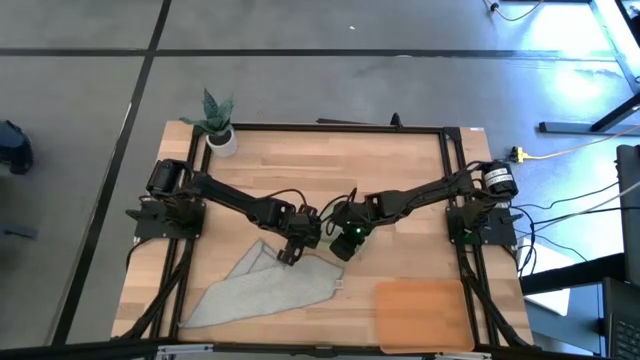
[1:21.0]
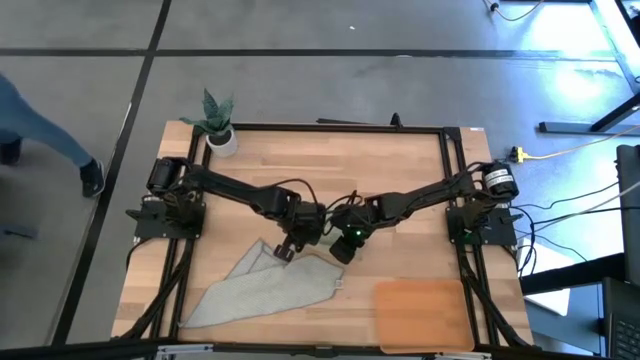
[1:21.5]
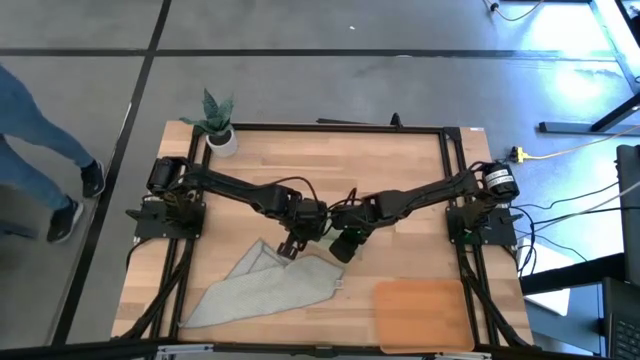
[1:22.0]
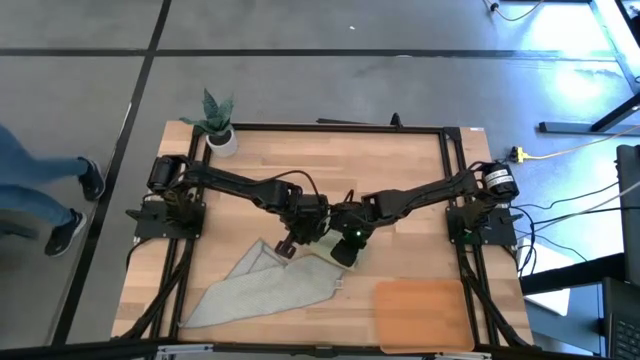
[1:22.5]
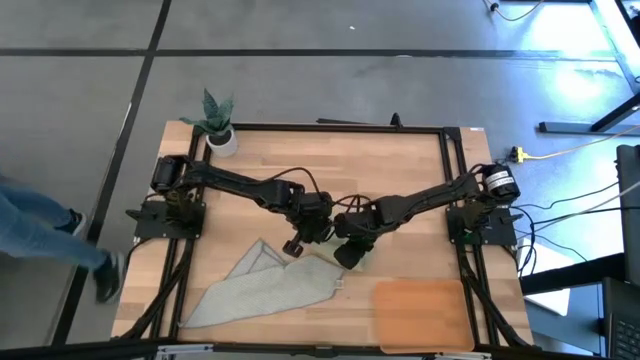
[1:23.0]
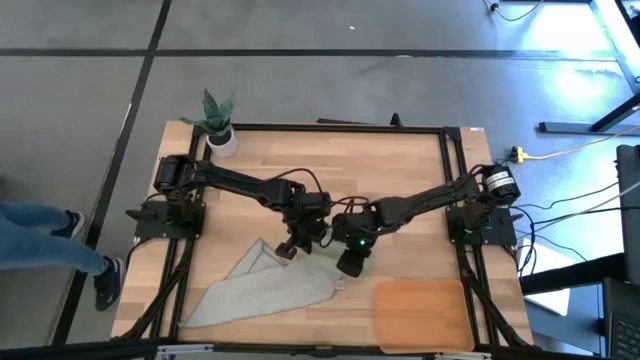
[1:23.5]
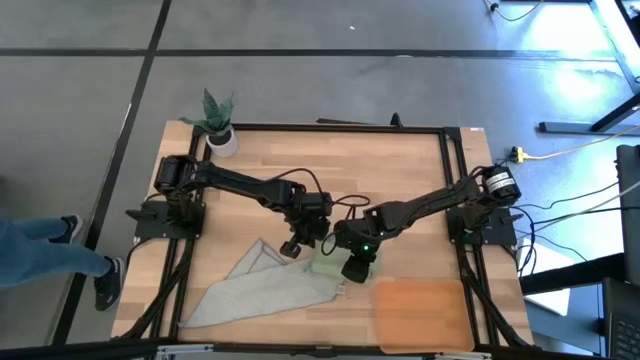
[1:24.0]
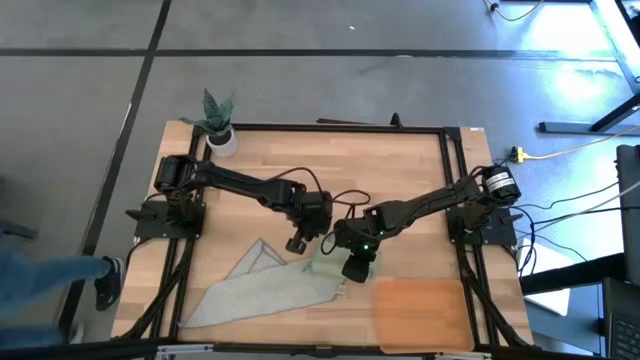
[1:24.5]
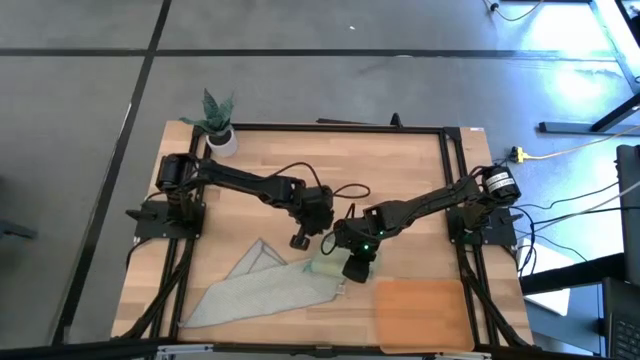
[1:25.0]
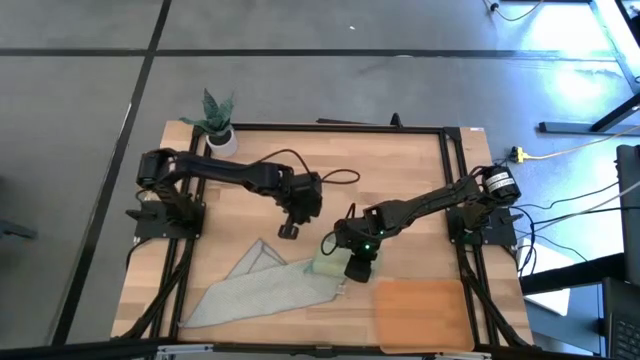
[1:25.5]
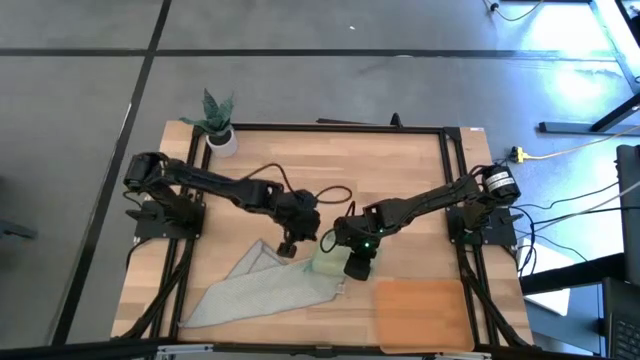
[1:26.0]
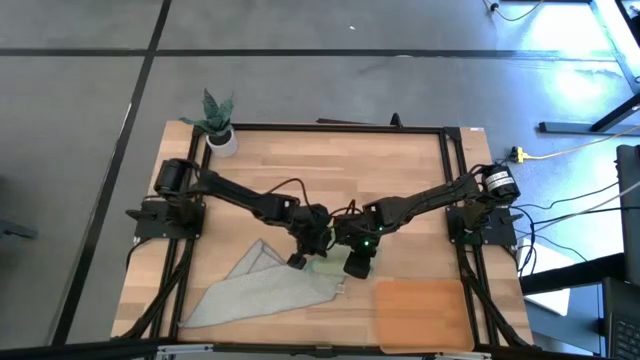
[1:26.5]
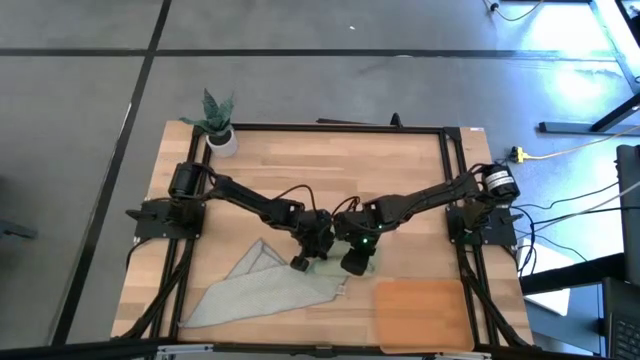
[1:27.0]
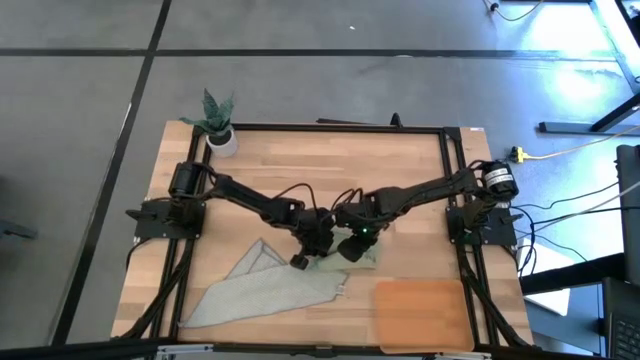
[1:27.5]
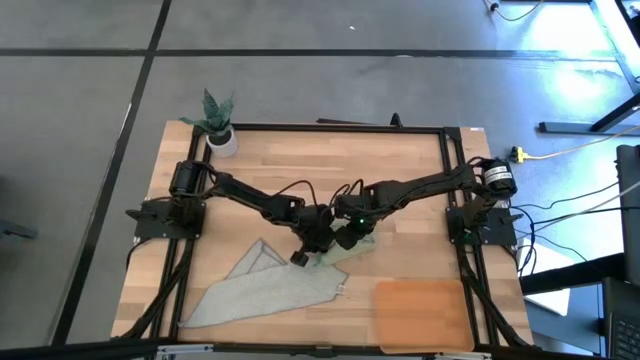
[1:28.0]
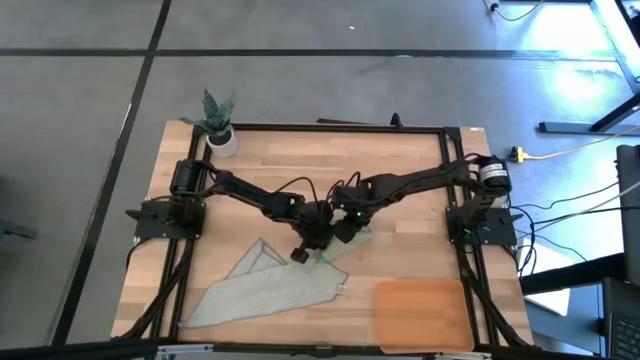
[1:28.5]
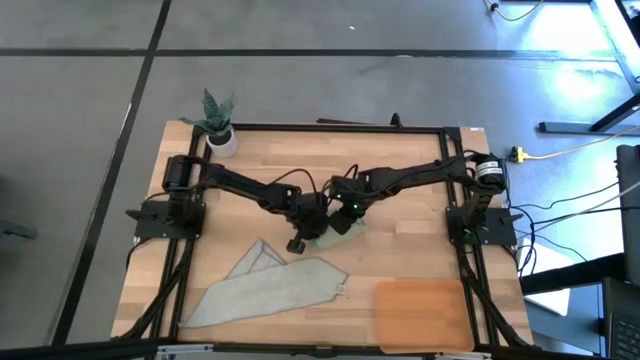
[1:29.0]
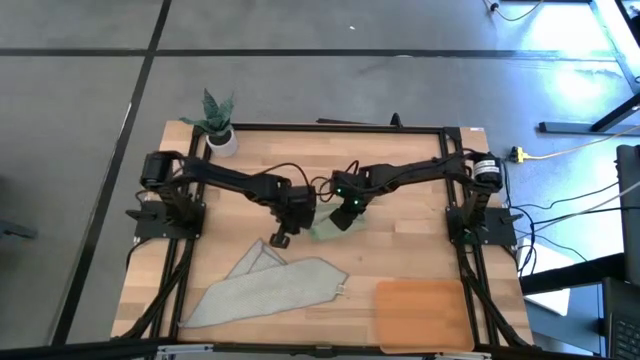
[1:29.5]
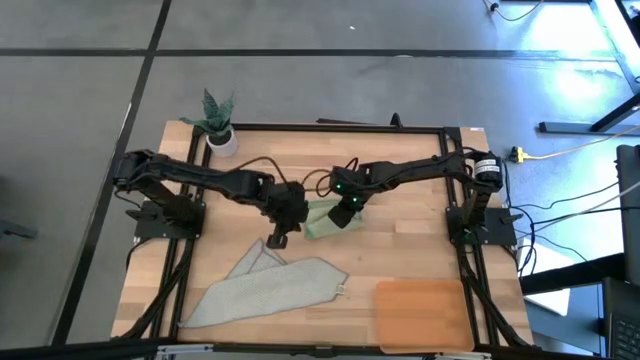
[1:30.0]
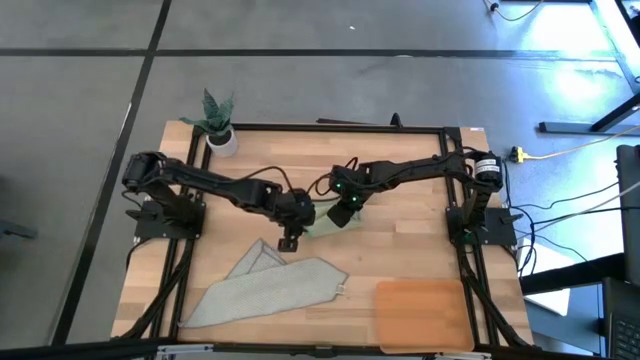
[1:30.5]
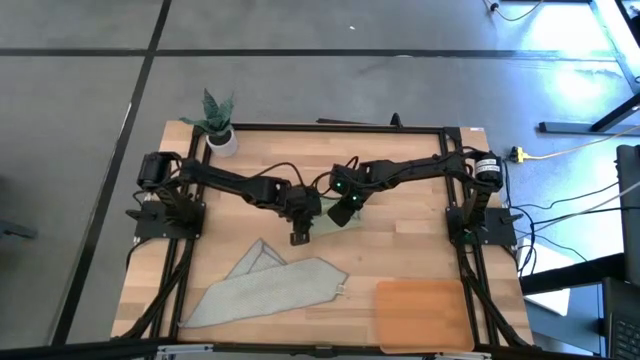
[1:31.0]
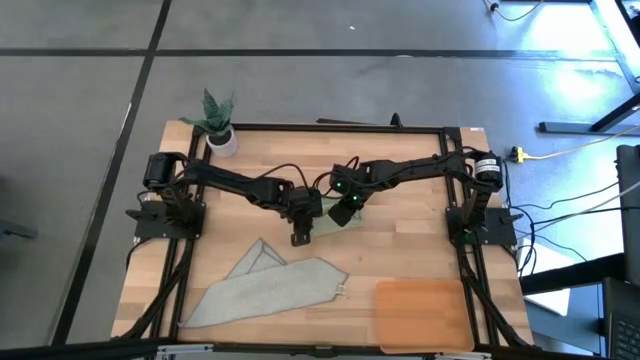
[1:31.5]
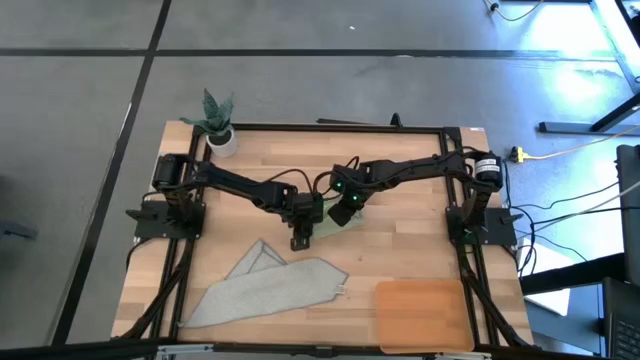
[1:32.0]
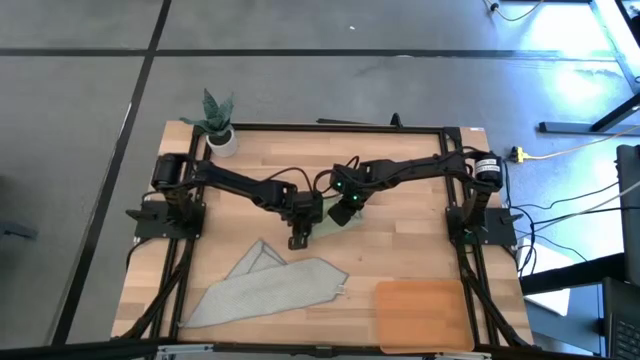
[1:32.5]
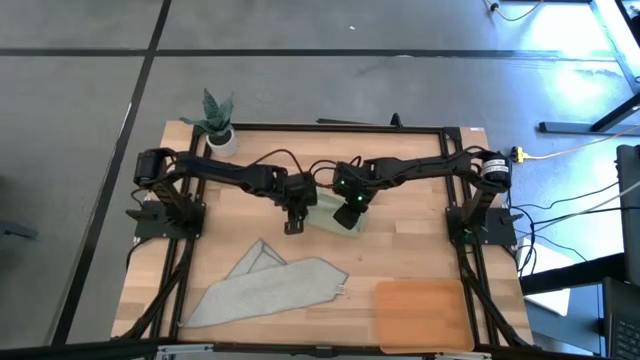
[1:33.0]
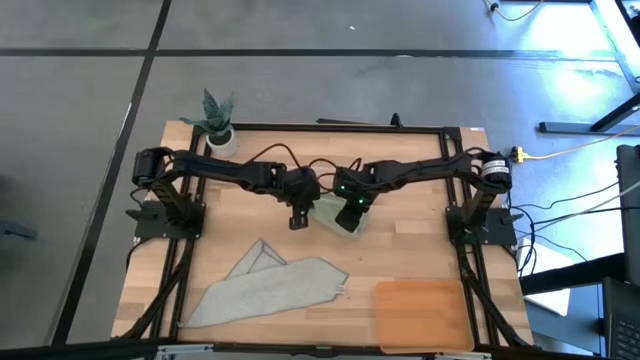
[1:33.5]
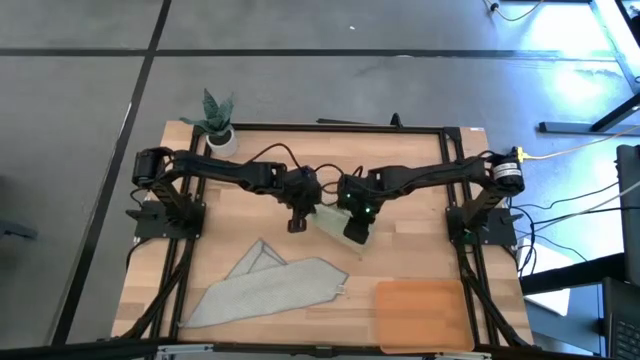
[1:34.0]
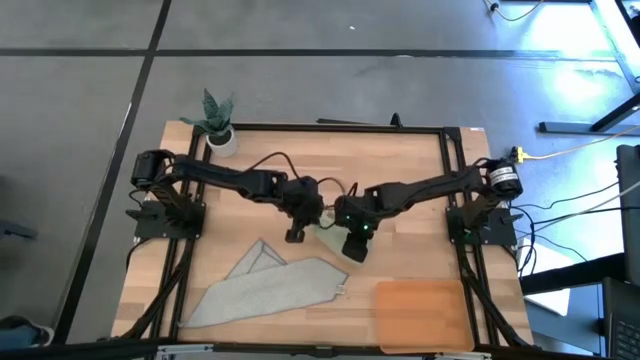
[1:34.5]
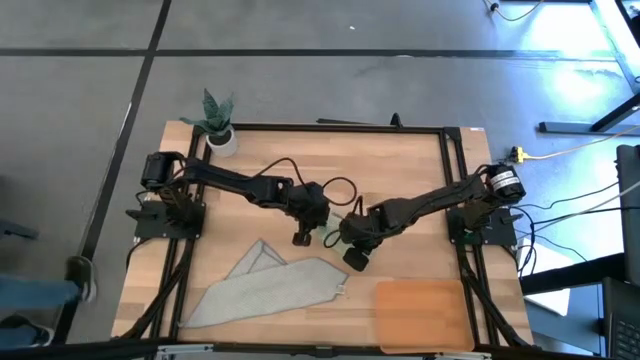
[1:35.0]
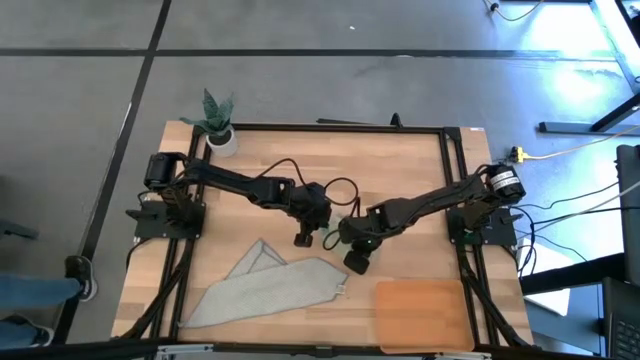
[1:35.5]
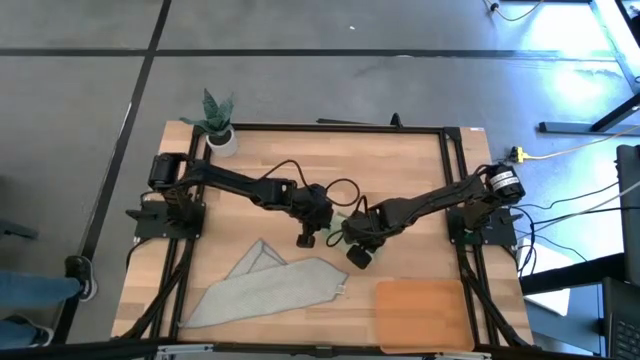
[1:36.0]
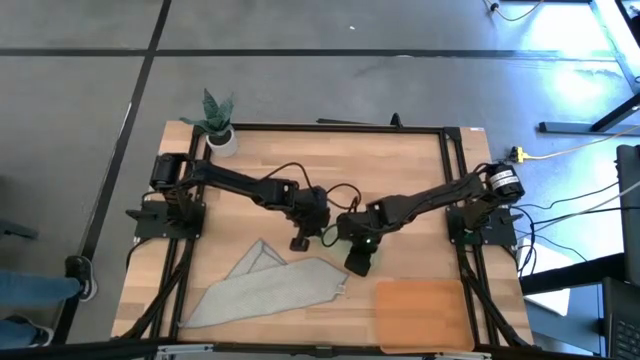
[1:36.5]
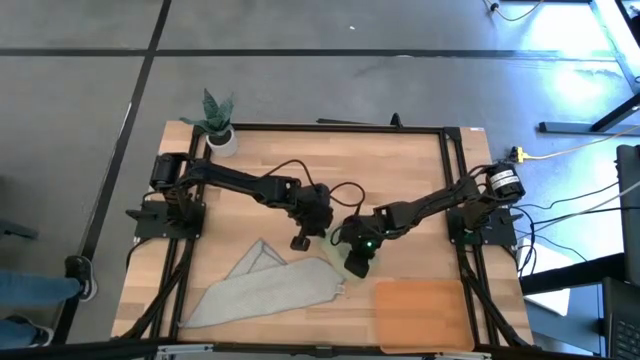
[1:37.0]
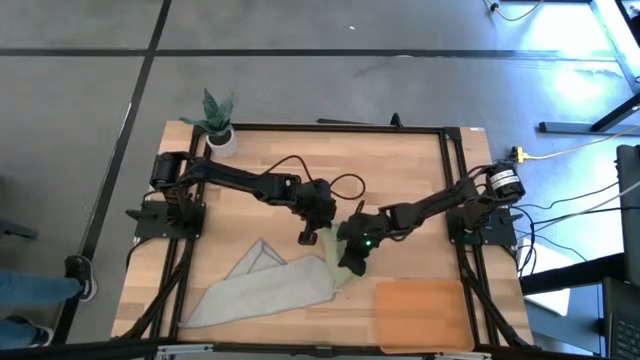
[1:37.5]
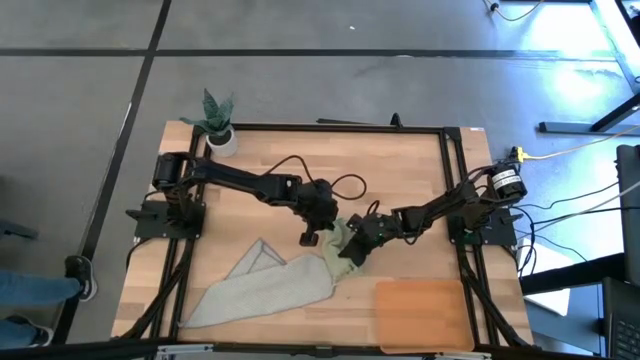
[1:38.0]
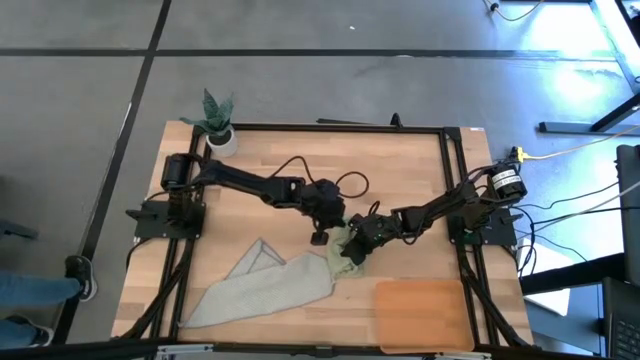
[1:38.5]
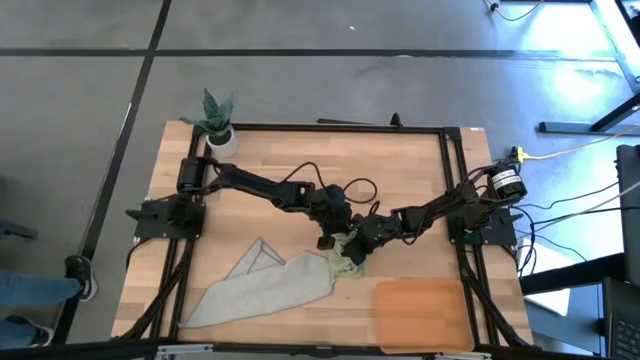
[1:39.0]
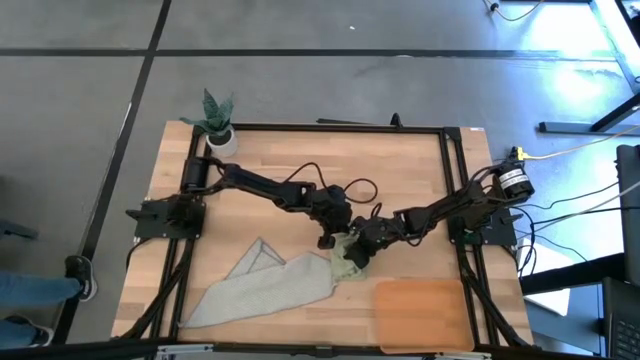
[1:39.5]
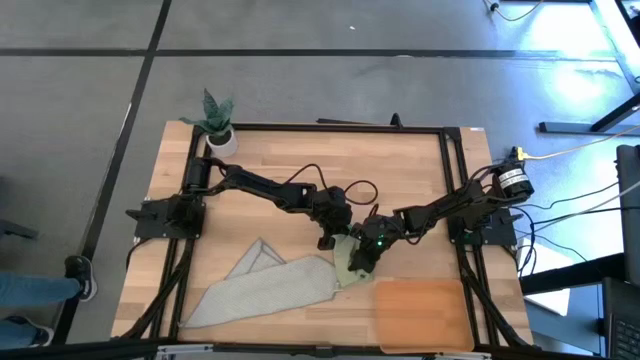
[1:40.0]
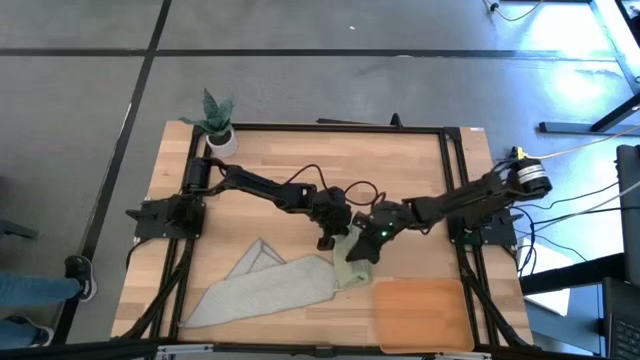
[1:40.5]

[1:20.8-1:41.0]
Task: Roll microfiber towels into tight, uniform cylinder then place into a basket
Roll the green microfiber towel
